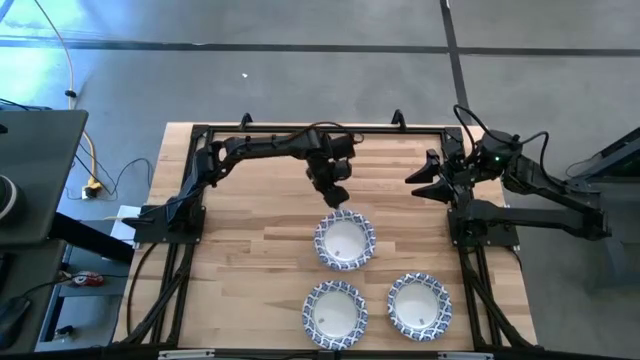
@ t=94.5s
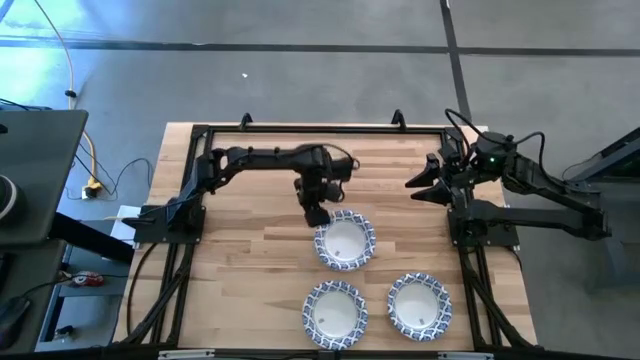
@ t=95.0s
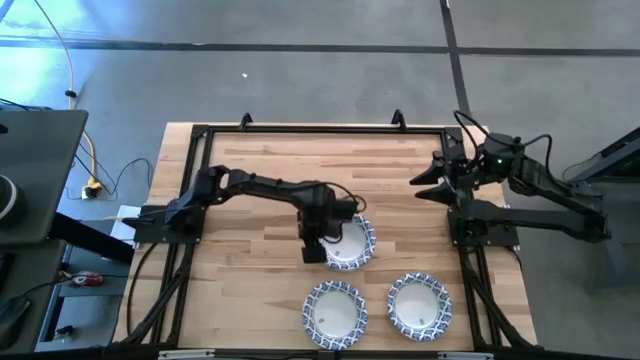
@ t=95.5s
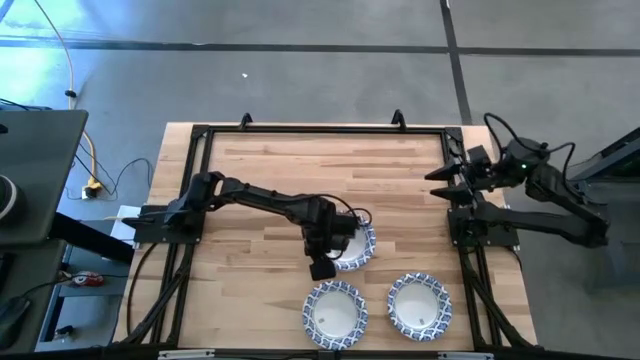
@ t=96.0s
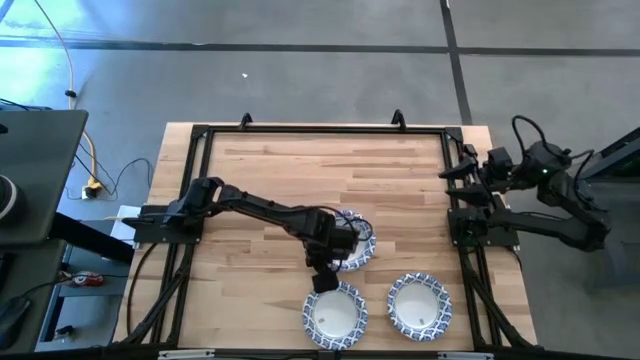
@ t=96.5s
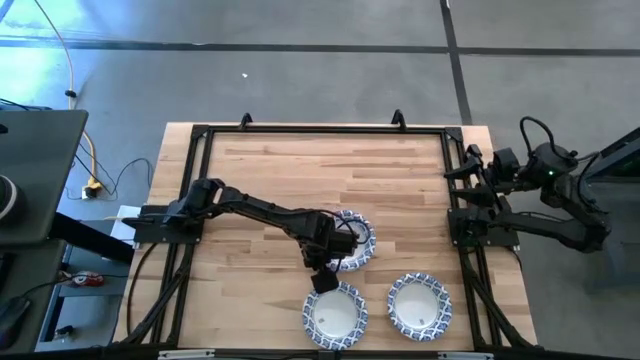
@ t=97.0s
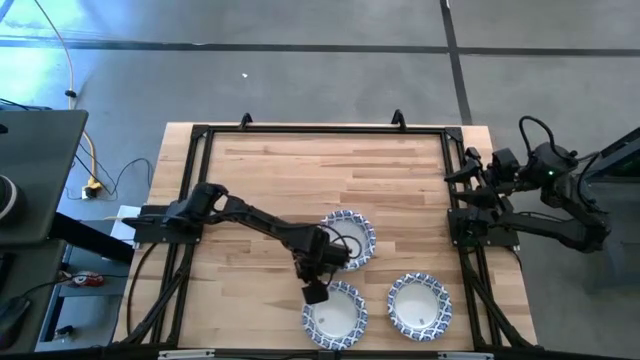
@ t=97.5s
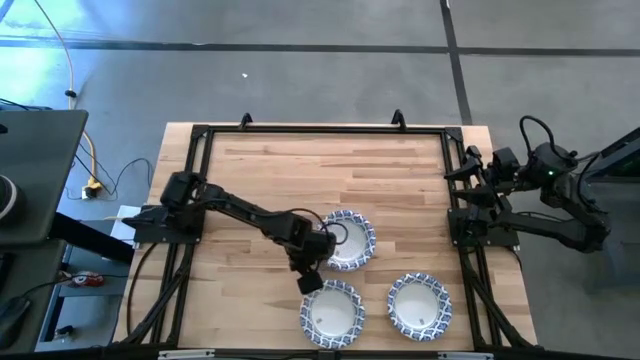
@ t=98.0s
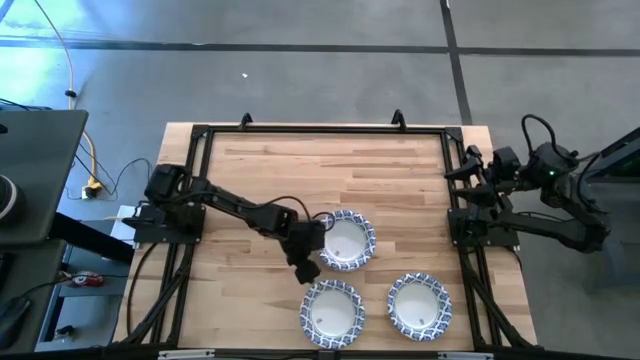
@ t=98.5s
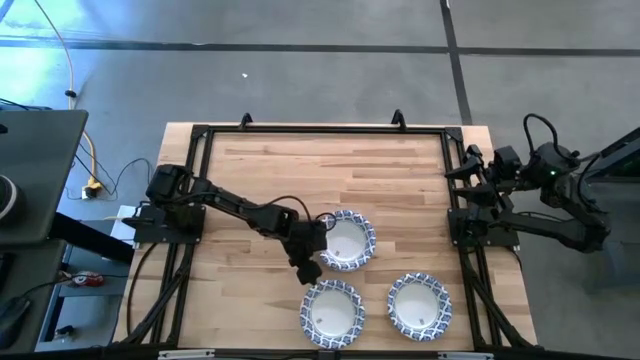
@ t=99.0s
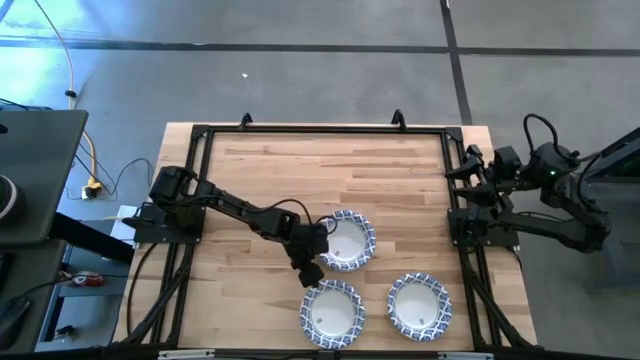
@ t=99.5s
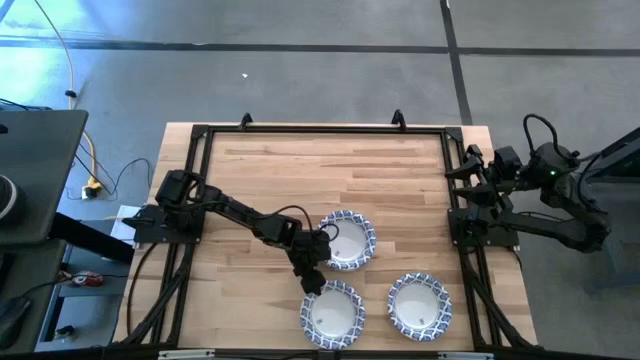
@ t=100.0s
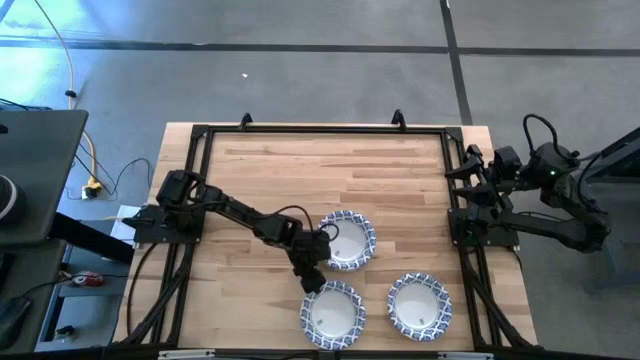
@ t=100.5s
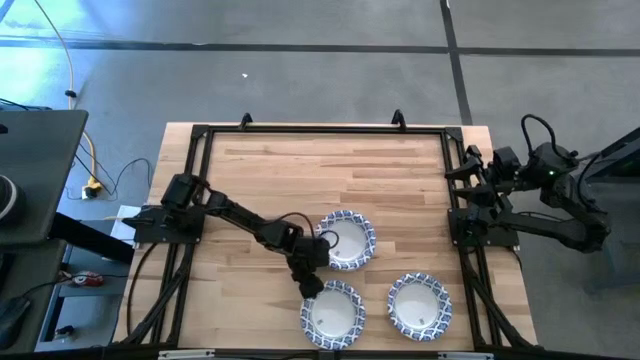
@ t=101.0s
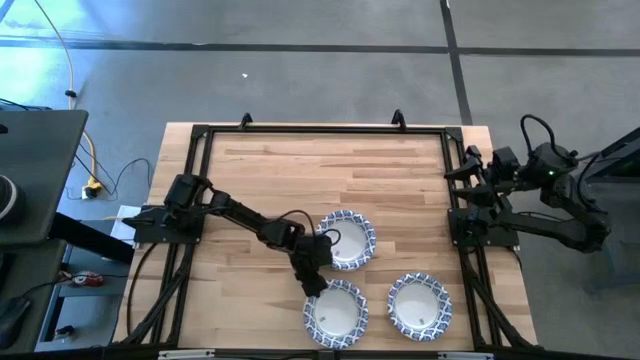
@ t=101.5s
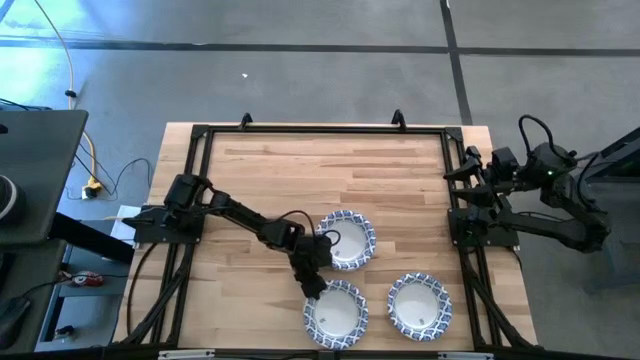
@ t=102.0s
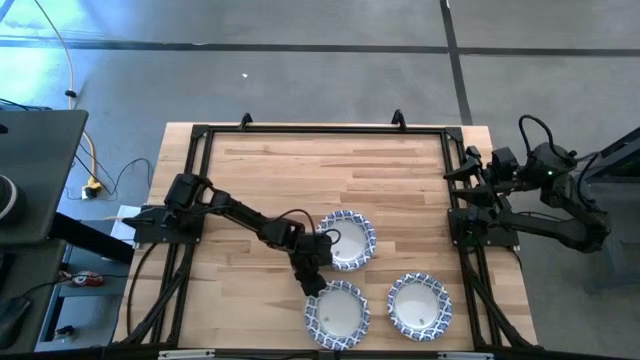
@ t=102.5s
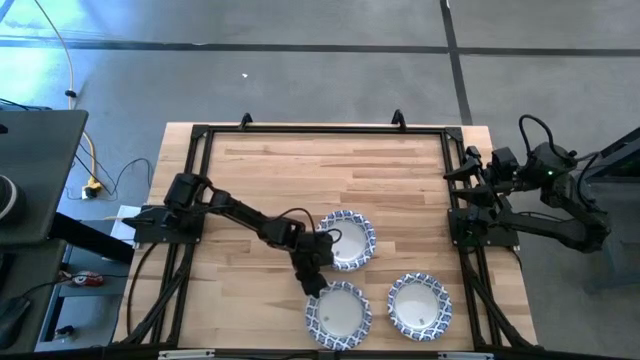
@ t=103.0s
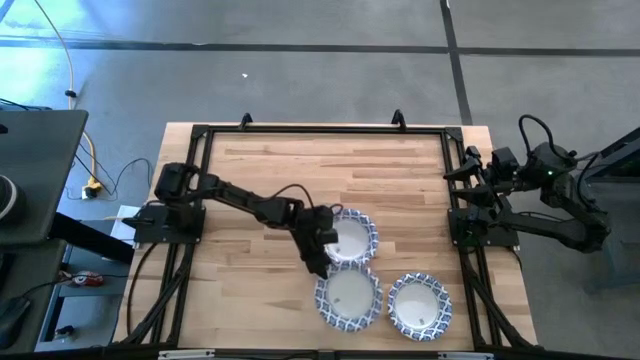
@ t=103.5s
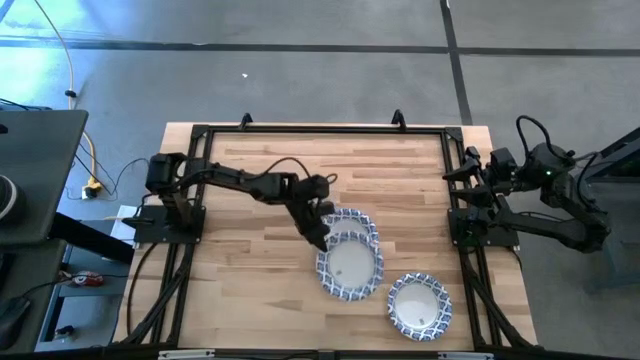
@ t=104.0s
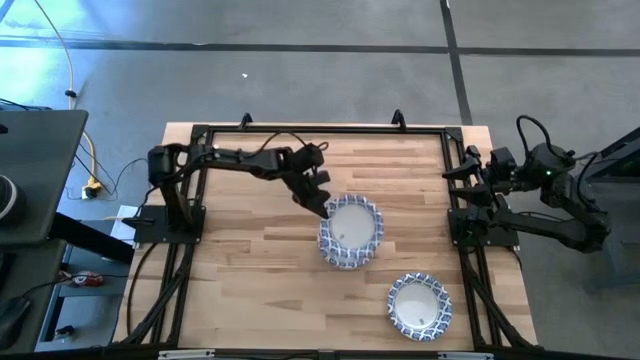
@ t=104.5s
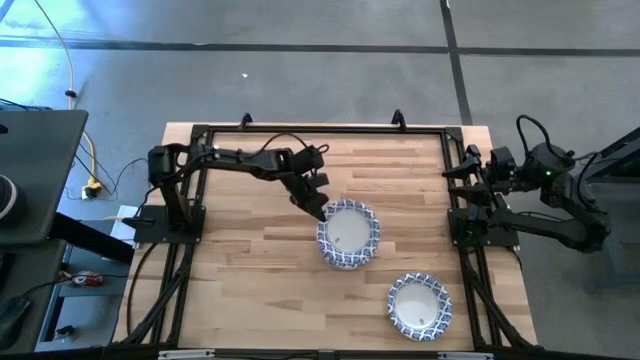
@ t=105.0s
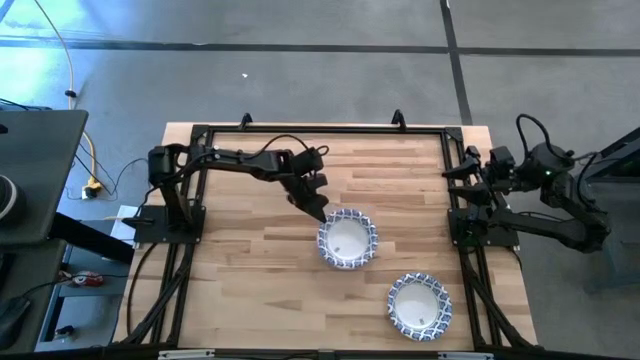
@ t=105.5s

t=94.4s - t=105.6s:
Task: Nest bowls inside each other
Stack the white patterned bowl on top of the other white patterned bowls

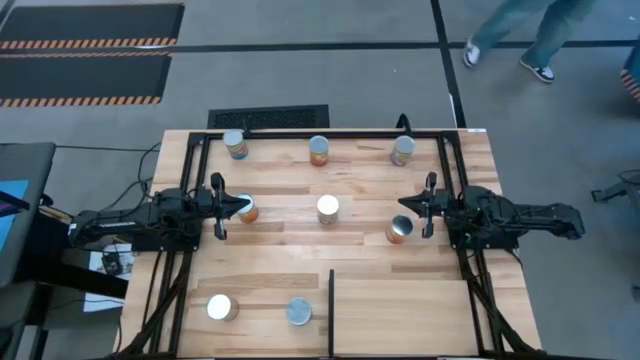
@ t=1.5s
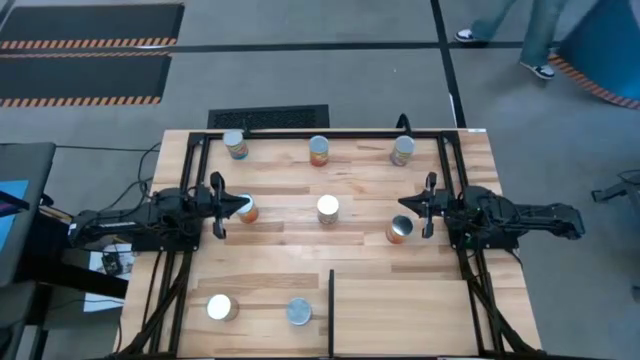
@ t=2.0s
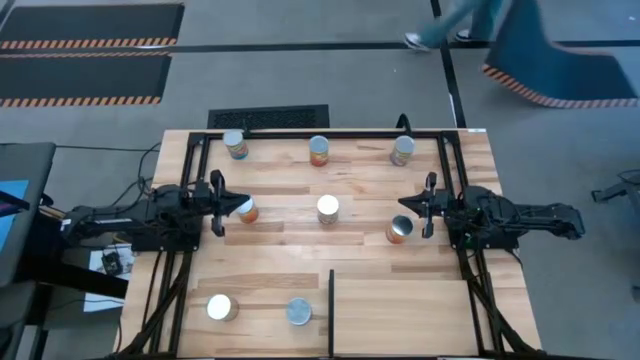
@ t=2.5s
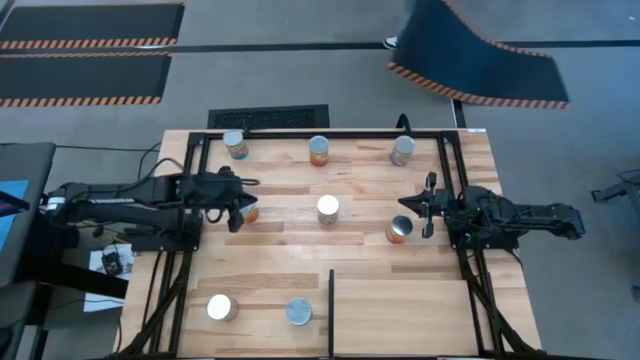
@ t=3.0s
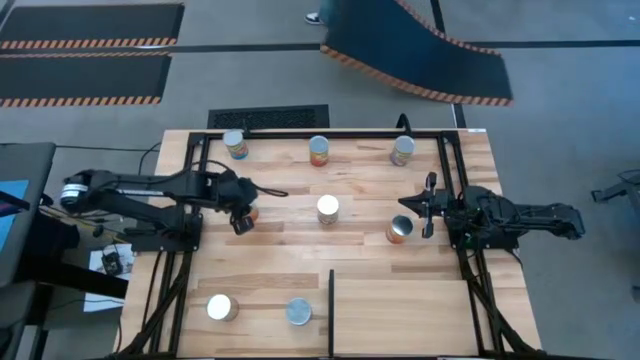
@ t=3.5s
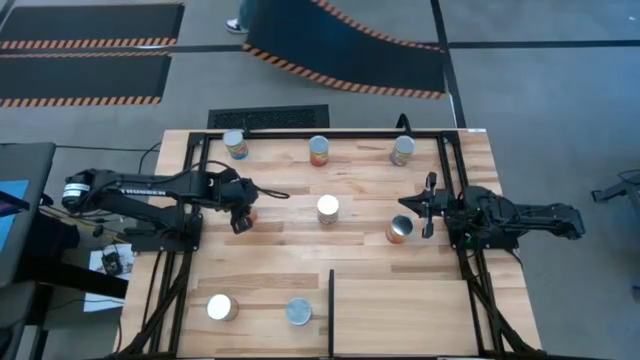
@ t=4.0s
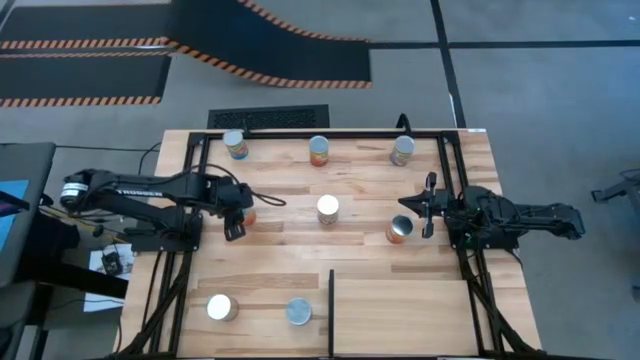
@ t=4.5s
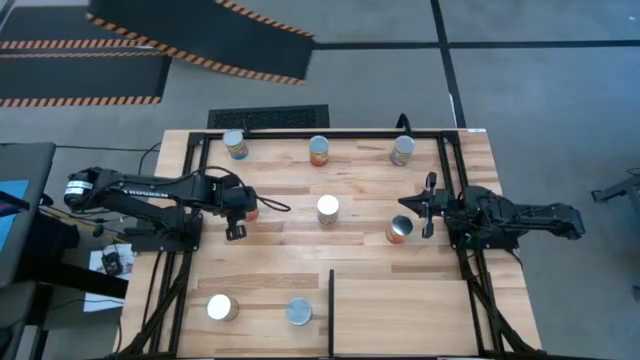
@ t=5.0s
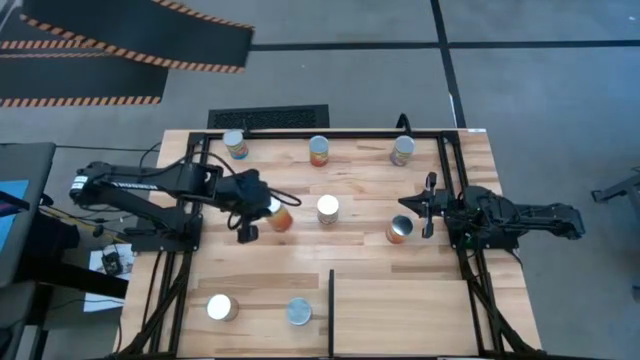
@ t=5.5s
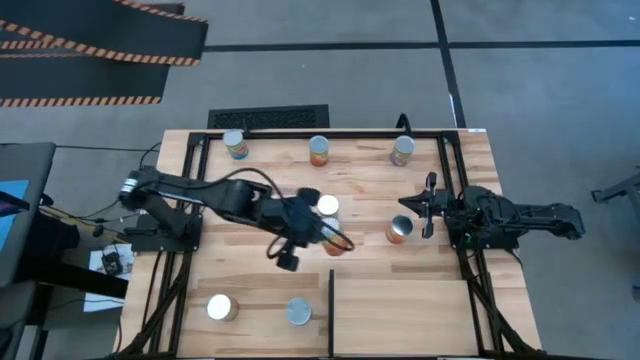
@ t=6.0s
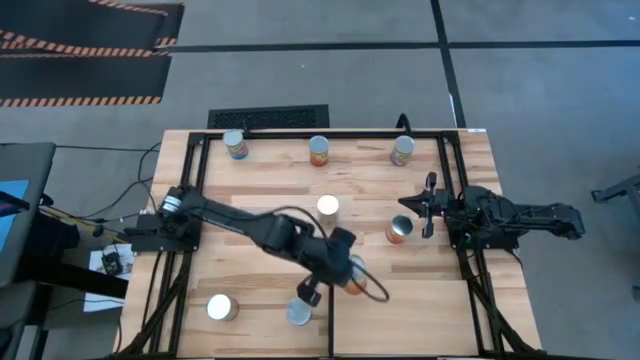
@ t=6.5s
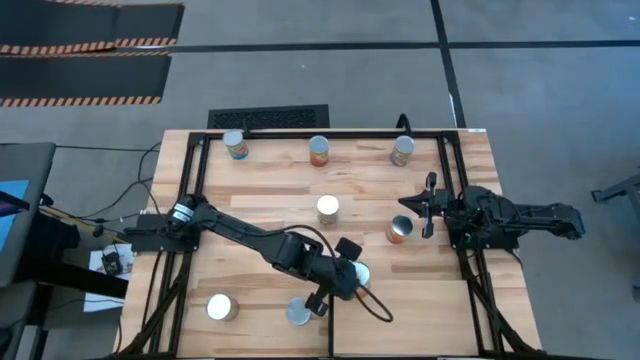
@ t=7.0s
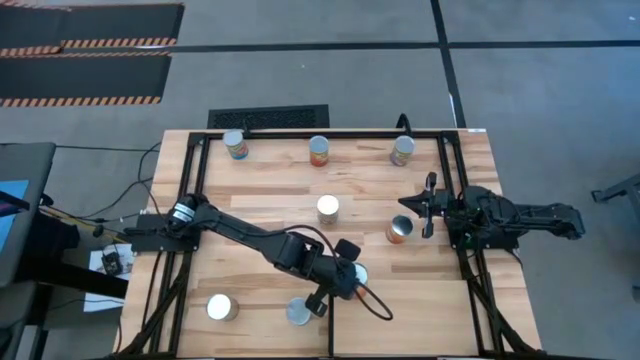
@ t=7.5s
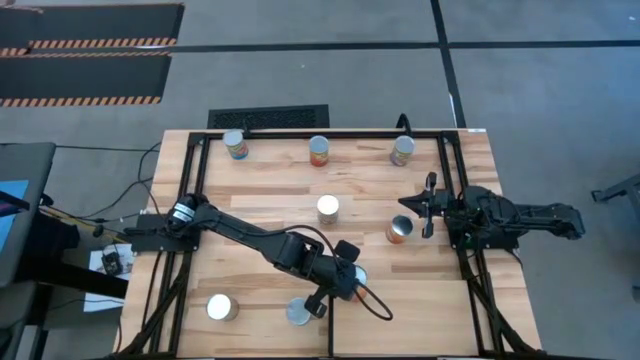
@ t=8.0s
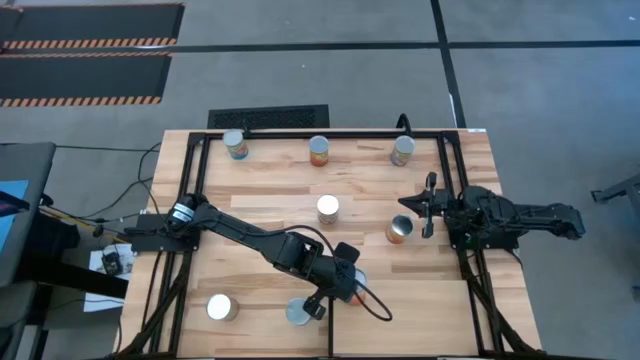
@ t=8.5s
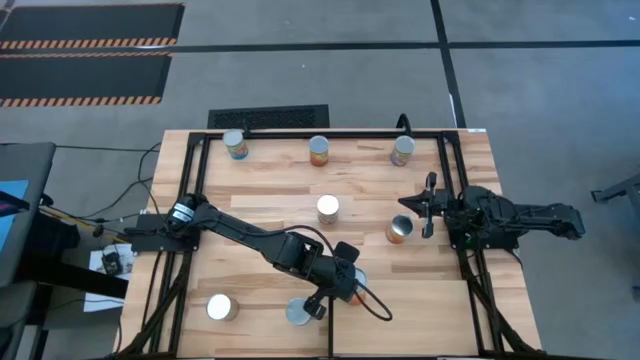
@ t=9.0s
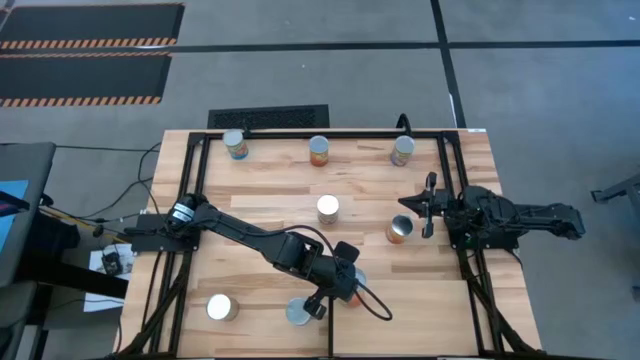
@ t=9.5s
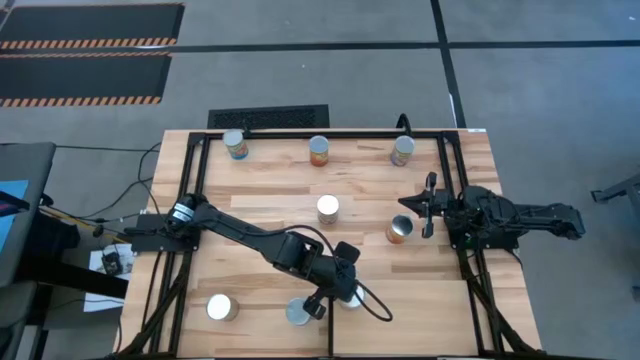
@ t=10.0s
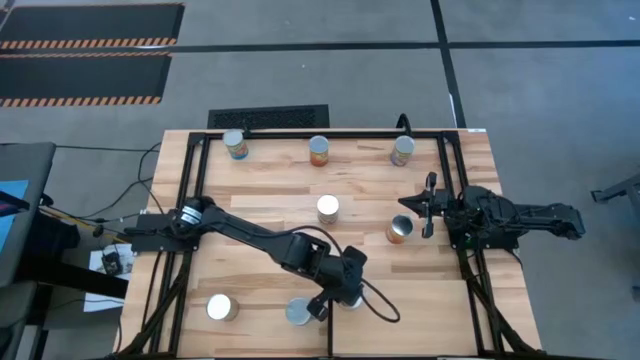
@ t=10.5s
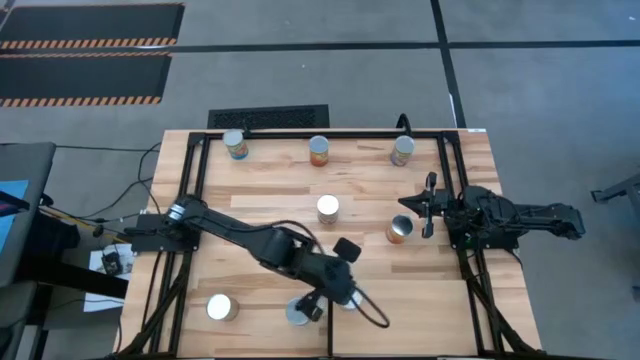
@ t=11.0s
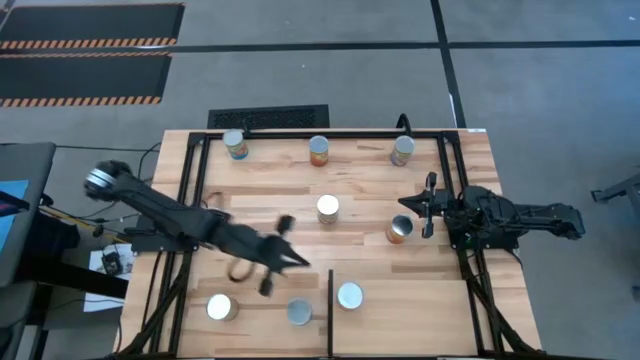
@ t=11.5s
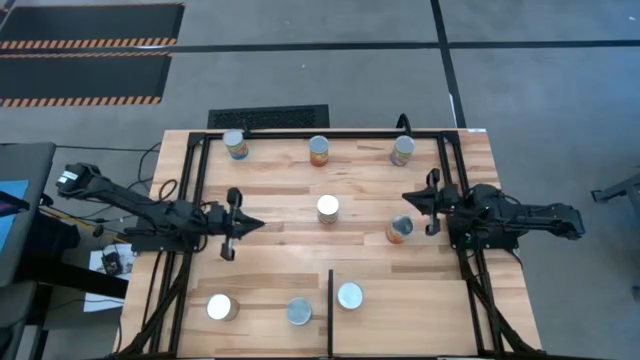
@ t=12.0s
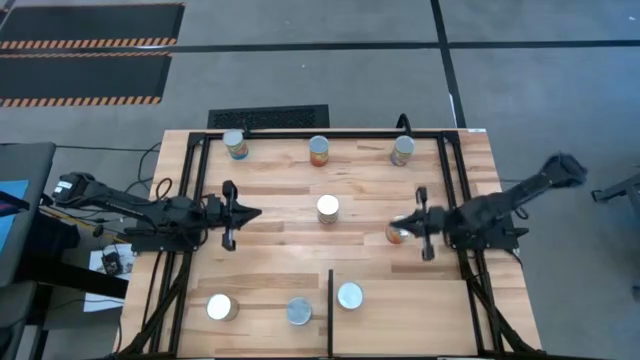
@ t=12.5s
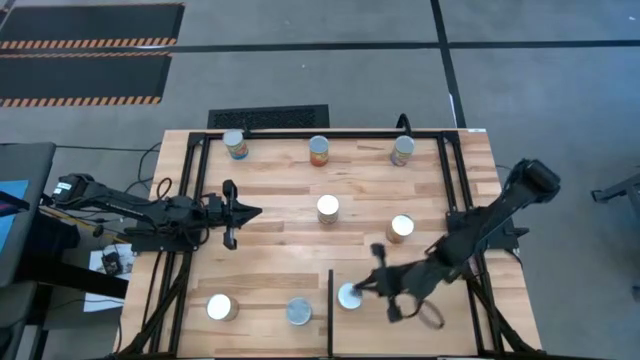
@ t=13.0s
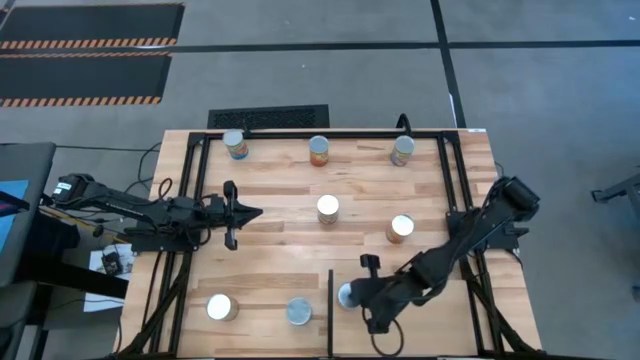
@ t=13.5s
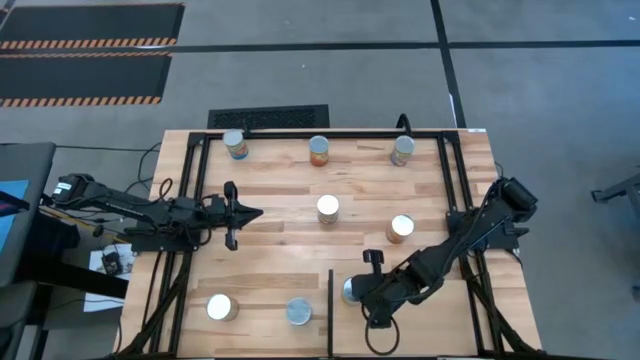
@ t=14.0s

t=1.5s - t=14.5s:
Task: Pick and place cans onto a shelf
Put the top canned green beans on the shelf
